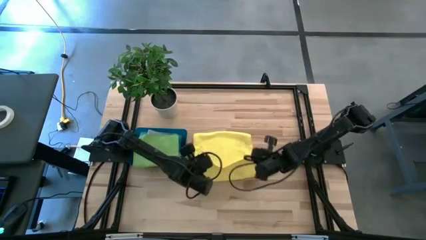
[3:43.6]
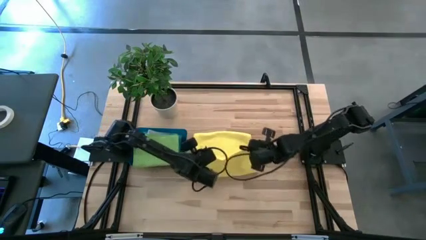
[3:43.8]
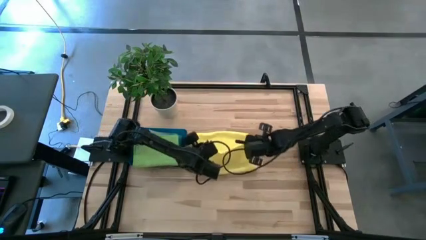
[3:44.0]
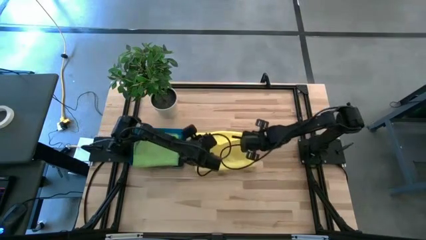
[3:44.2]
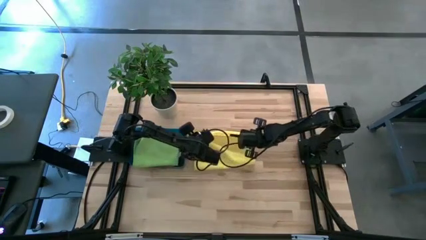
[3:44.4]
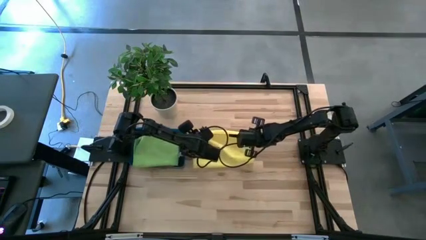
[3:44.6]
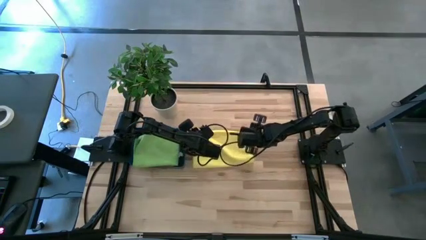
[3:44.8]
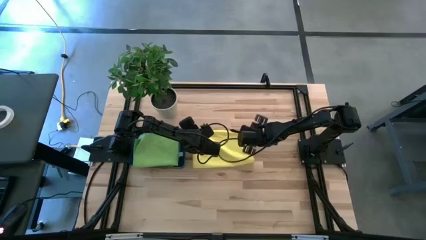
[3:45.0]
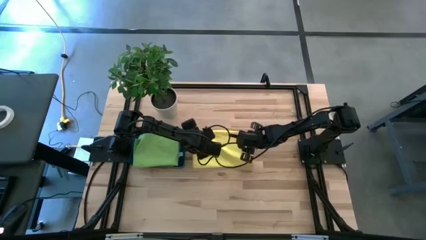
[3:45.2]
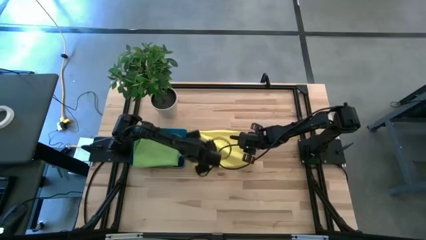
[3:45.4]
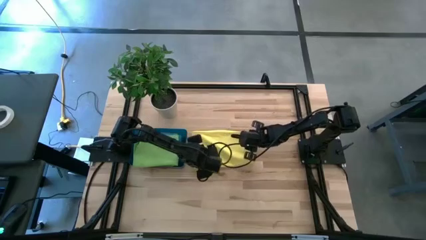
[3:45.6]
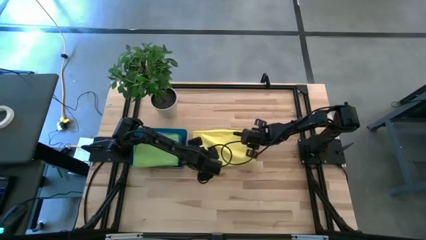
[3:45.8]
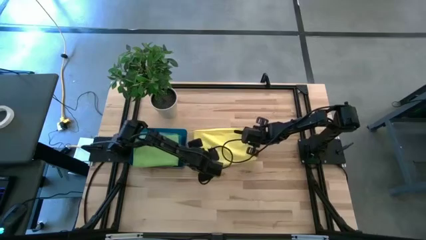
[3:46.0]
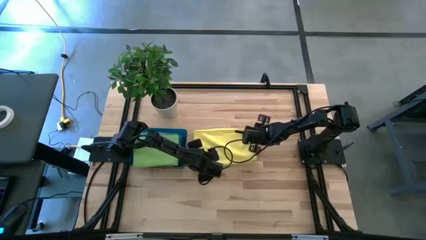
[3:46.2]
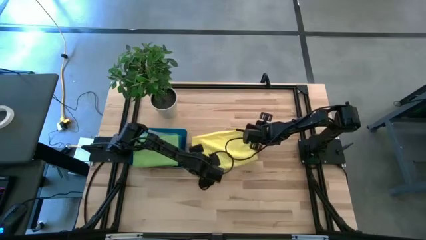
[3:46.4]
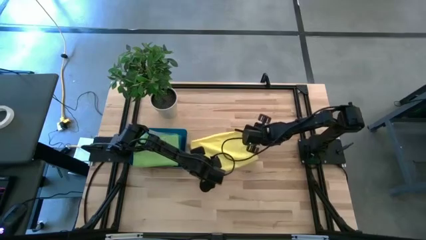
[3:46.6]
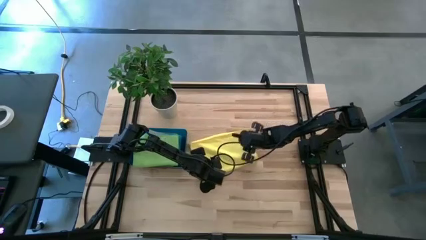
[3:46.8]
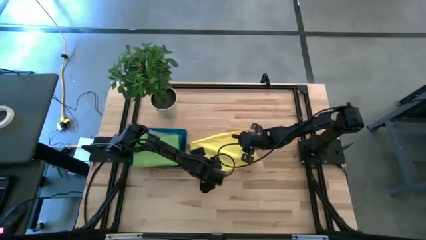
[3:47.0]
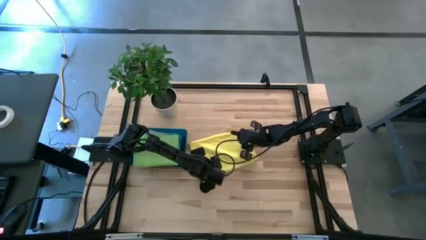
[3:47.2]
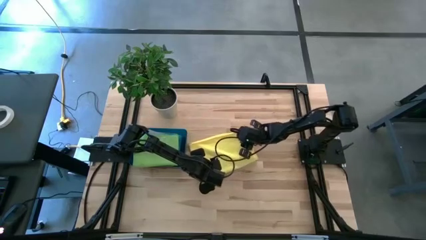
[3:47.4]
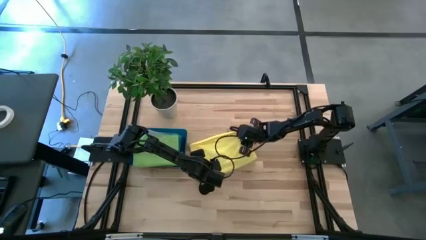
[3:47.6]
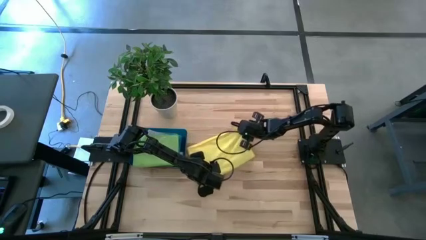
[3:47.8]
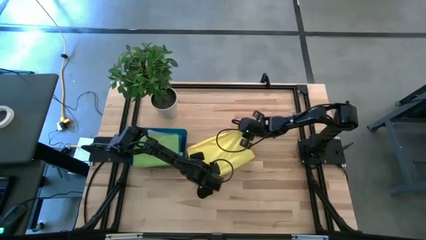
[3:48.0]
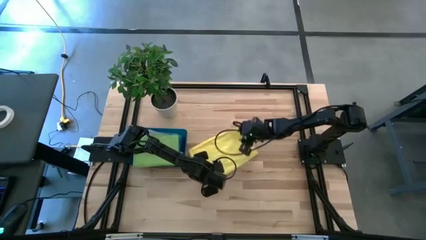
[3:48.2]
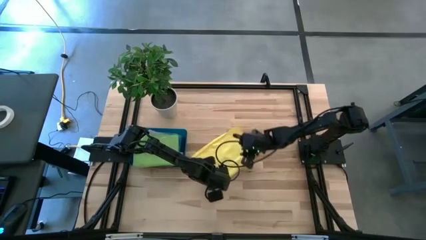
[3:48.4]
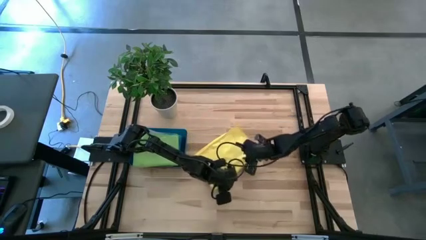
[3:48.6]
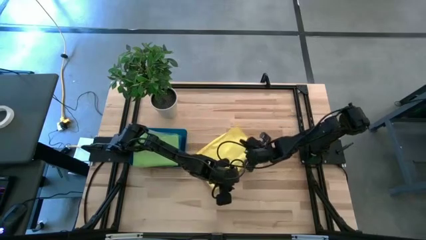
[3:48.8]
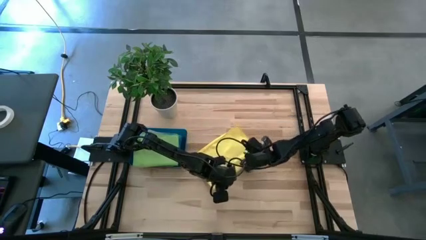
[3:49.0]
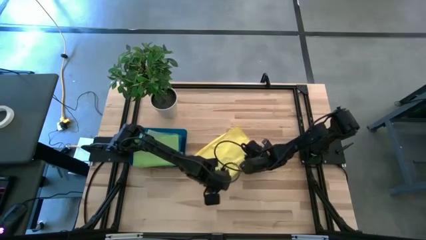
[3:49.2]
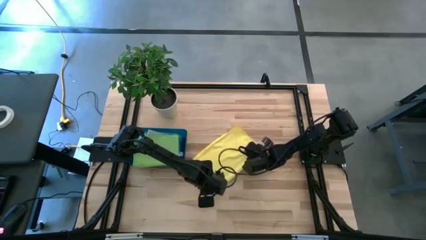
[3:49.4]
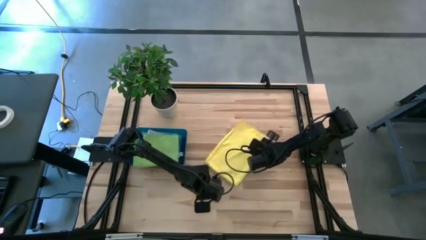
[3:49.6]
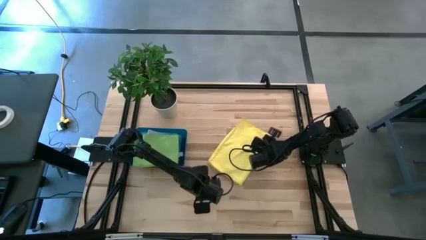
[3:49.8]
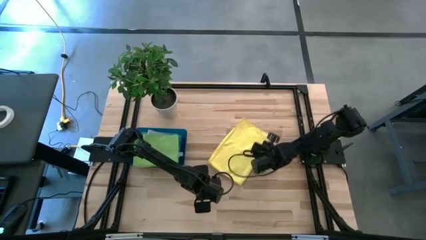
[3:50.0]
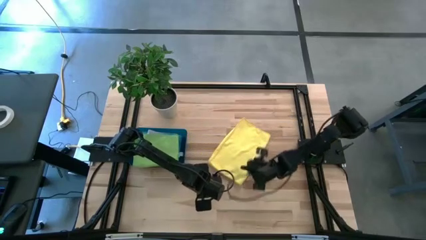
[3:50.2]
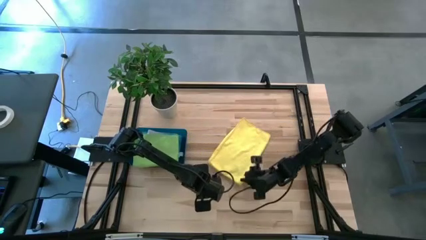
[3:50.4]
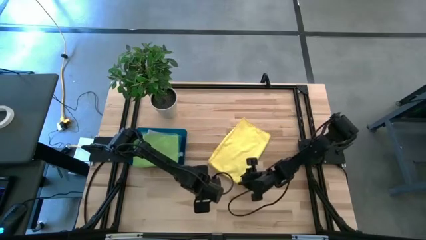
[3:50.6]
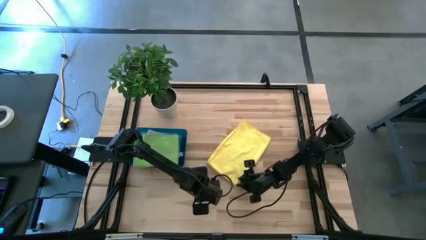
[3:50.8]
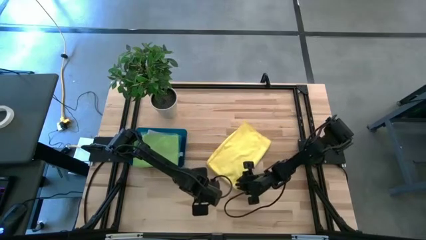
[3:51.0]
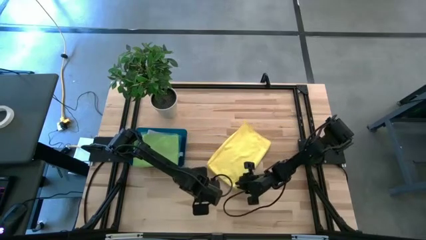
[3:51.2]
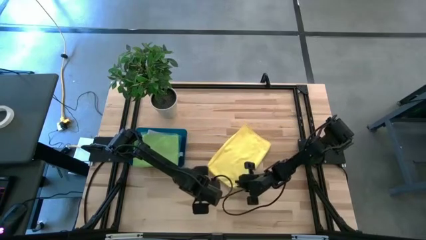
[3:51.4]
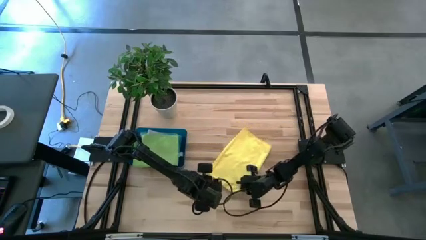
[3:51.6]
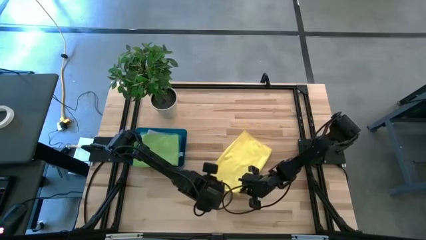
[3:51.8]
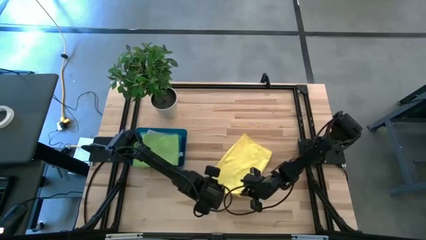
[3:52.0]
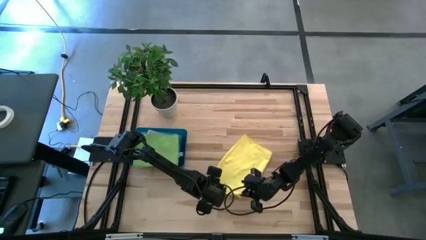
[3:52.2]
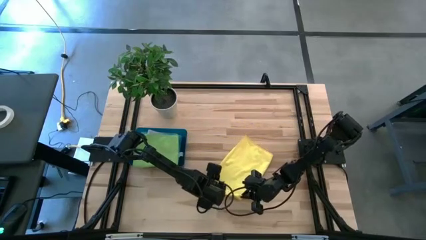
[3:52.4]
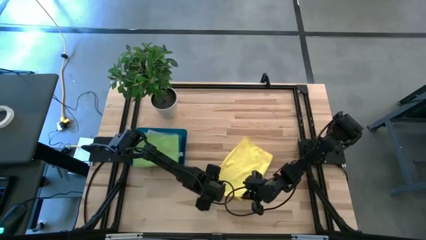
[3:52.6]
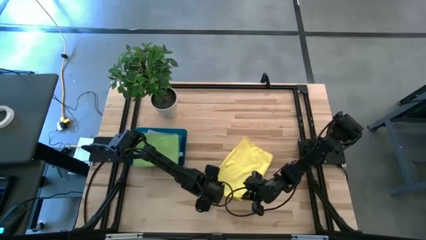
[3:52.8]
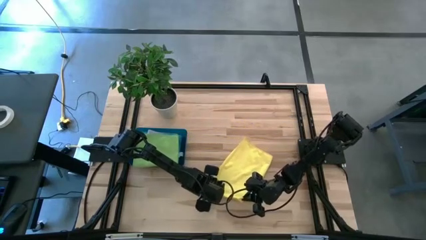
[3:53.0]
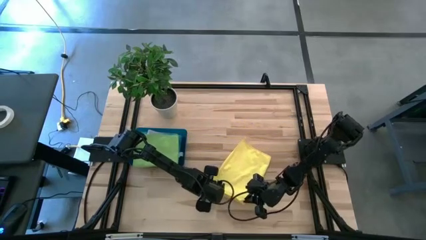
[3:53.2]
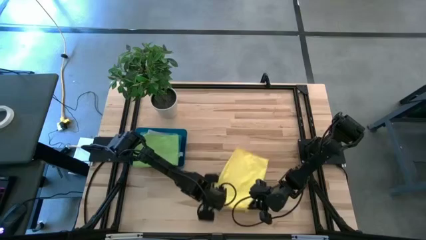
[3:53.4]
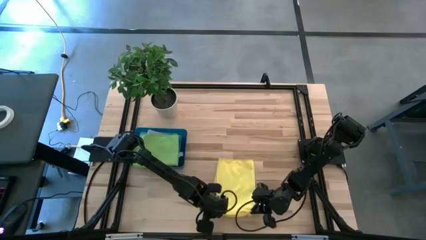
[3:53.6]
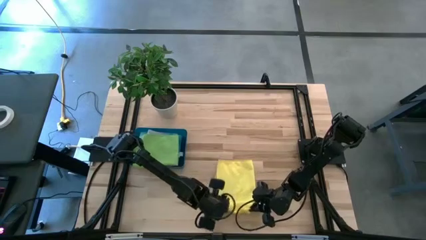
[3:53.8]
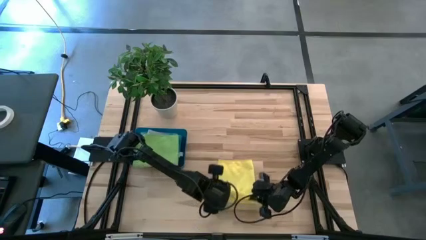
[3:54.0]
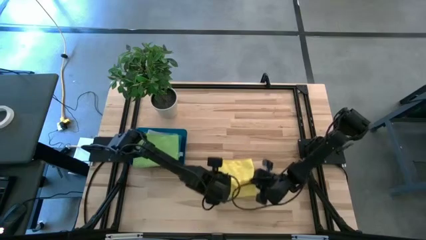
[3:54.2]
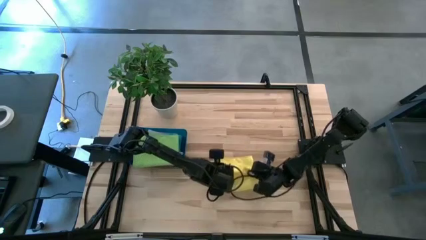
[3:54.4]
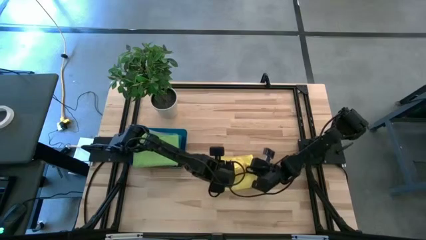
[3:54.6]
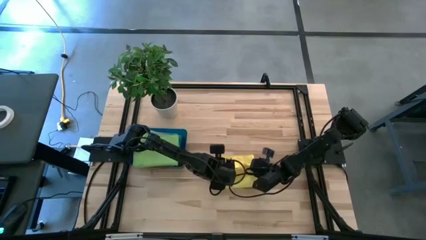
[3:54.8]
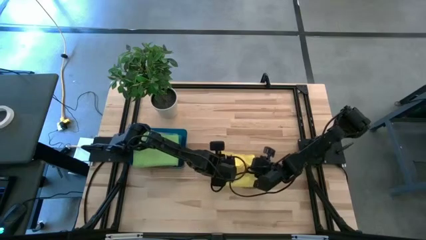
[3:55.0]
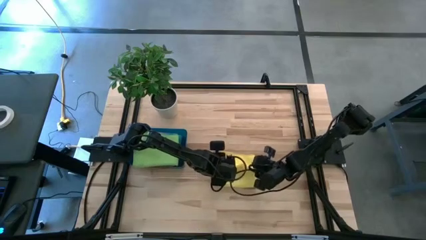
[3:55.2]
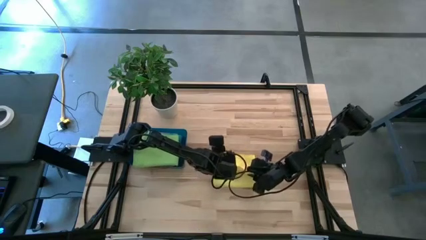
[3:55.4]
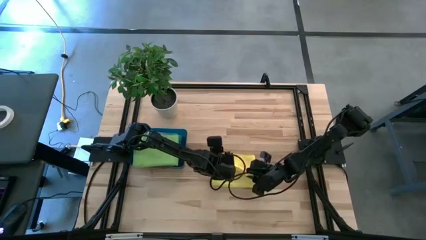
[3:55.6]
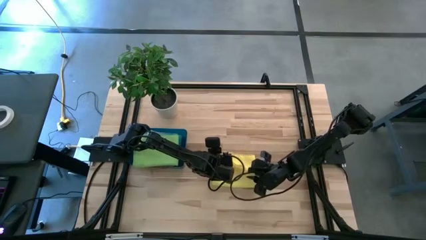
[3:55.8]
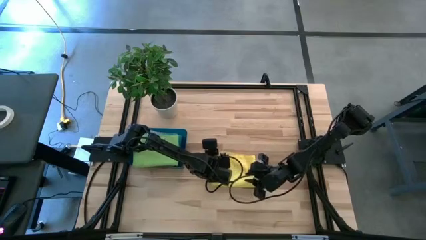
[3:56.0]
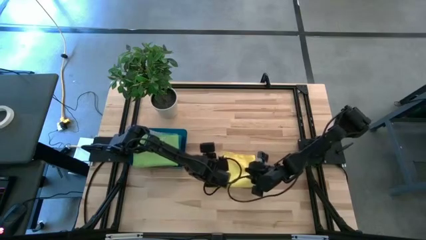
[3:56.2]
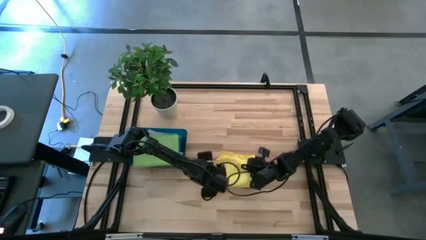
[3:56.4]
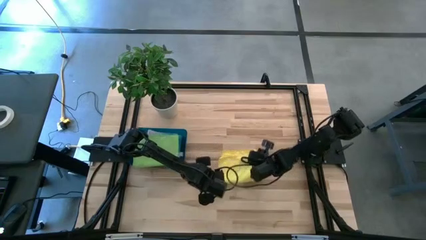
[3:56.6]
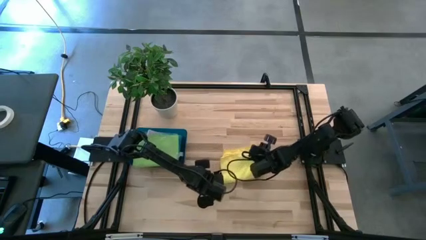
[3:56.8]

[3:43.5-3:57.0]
Task: Fold microfiber towels
Fold the yellow towel on the table

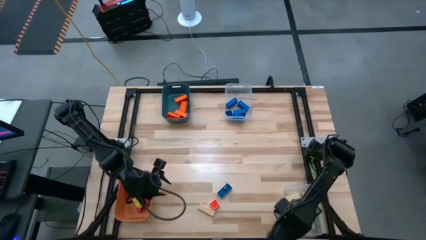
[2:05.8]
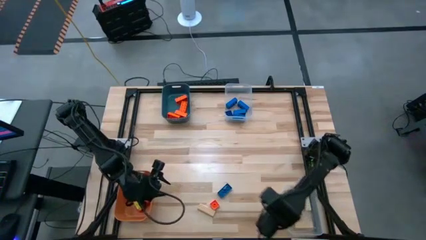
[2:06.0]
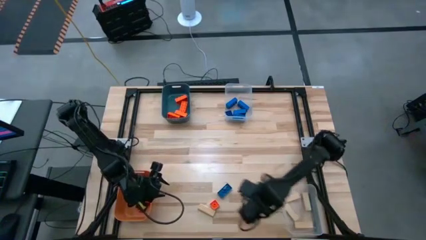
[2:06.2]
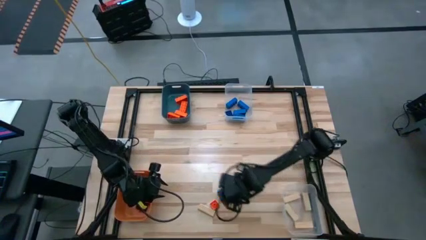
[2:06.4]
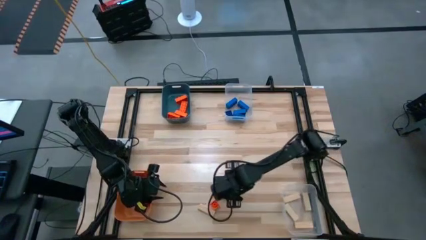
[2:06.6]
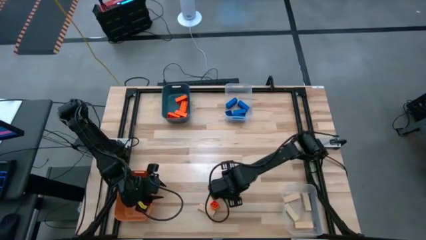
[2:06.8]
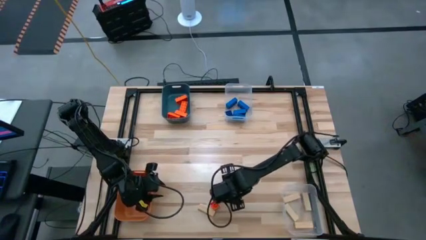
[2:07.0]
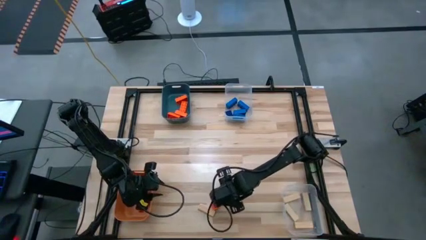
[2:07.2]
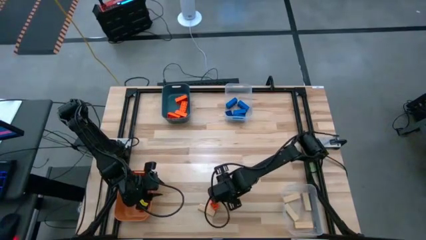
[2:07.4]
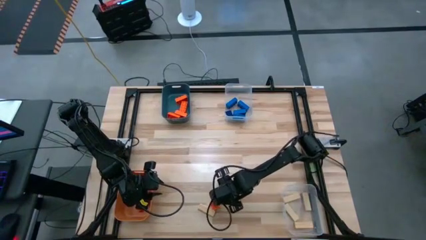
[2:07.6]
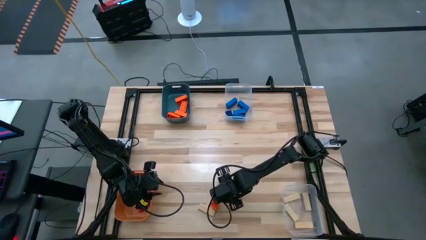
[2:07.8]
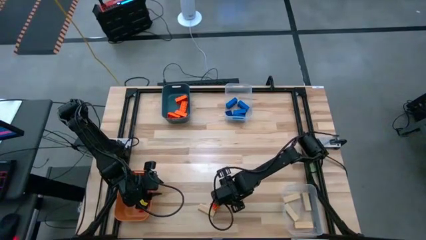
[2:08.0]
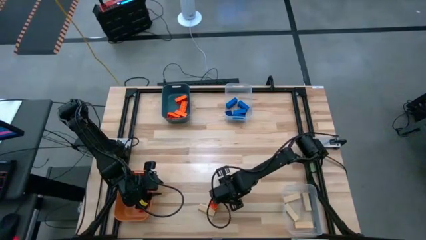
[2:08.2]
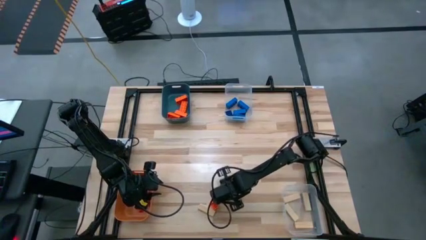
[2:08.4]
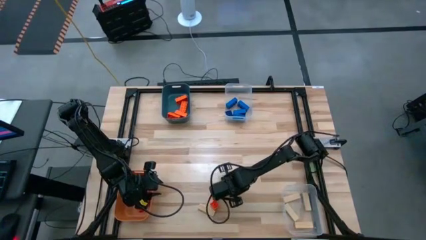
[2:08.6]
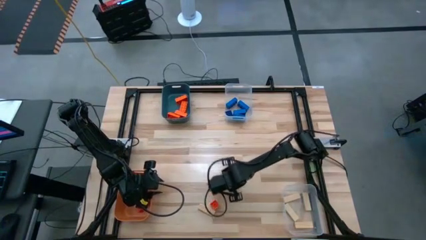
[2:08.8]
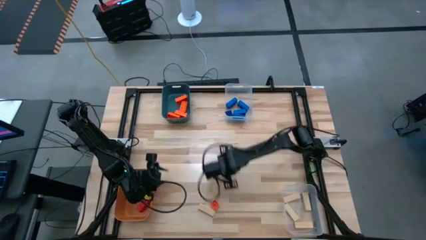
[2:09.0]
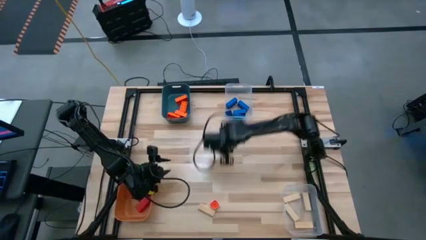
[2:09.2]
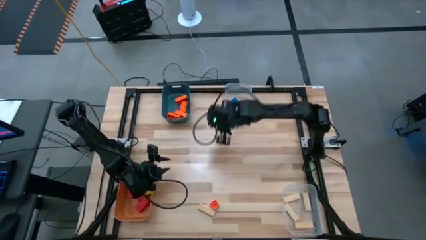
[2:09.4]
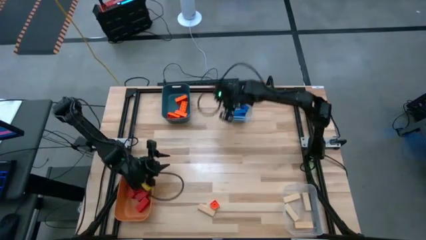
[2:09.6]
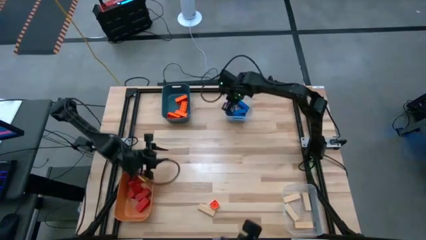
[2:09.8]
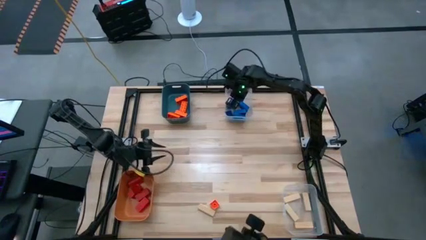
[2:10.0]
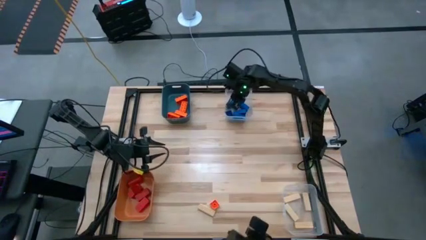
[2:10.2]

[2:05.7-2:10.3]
Task: Sort blocks
Put the blue game piece into the top transparent bin
